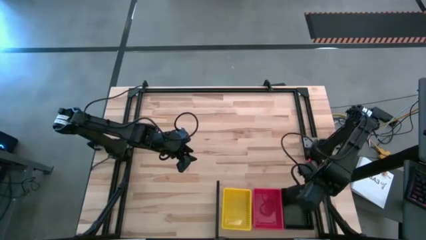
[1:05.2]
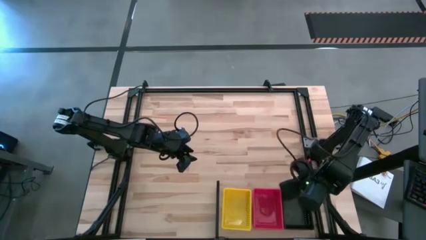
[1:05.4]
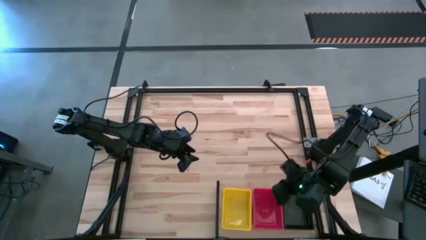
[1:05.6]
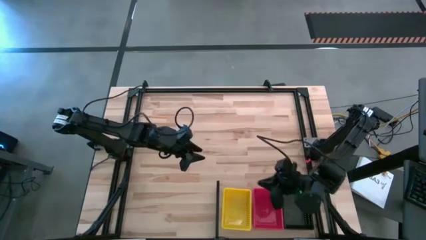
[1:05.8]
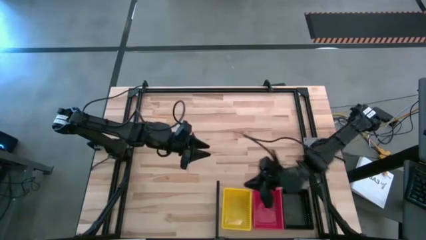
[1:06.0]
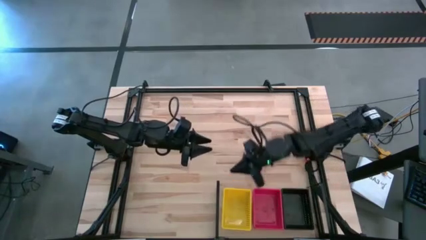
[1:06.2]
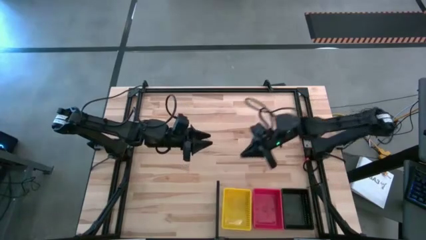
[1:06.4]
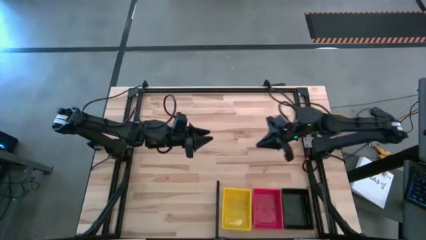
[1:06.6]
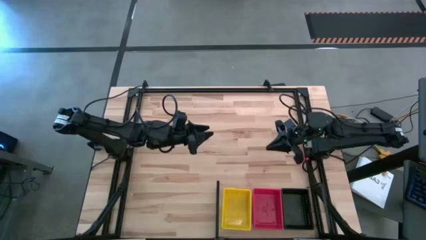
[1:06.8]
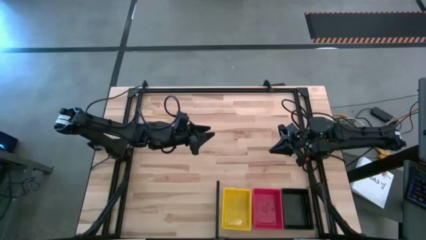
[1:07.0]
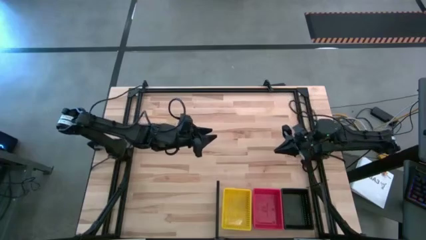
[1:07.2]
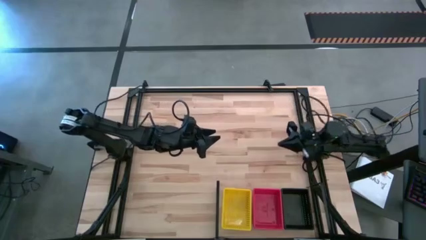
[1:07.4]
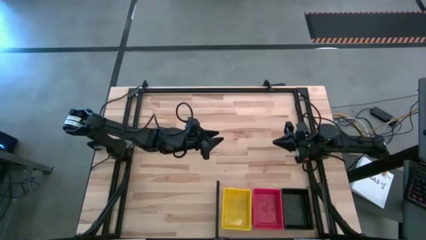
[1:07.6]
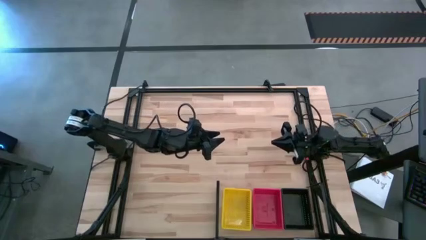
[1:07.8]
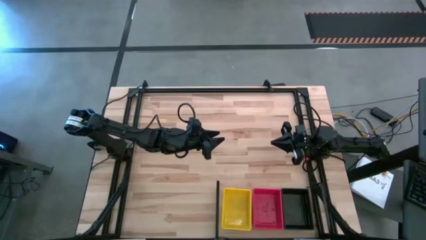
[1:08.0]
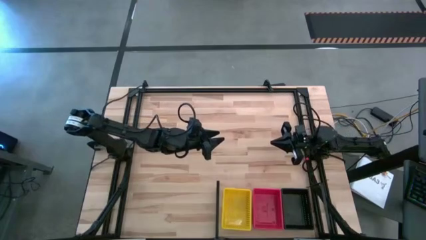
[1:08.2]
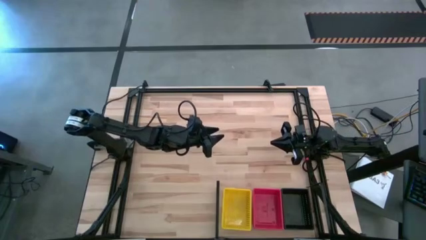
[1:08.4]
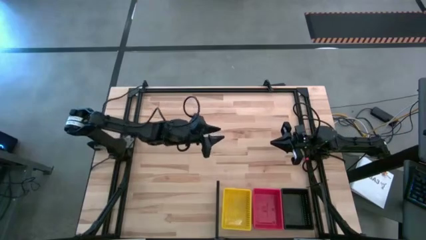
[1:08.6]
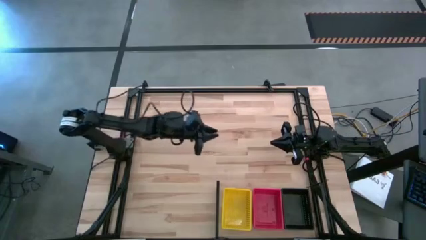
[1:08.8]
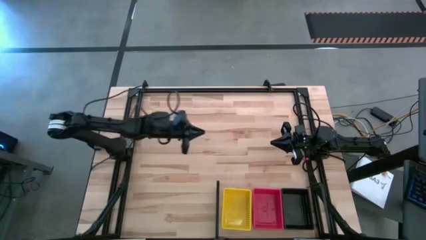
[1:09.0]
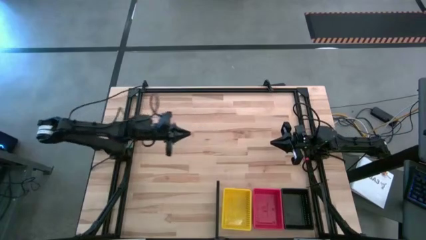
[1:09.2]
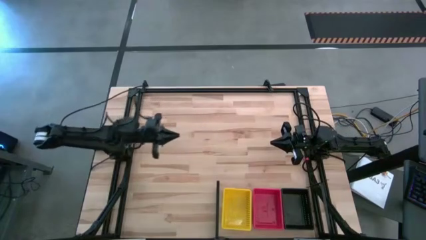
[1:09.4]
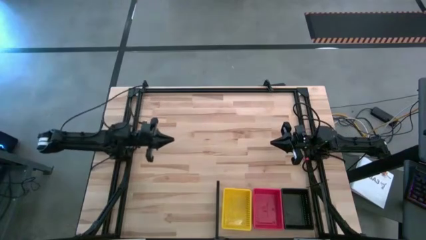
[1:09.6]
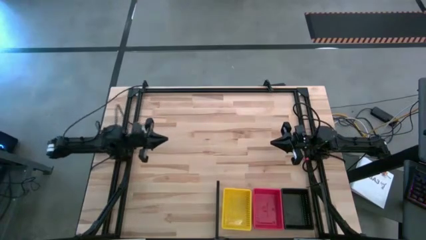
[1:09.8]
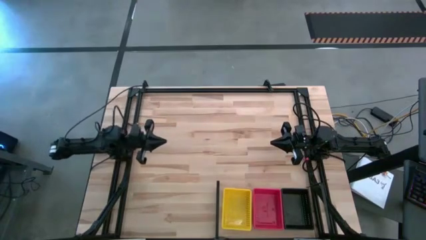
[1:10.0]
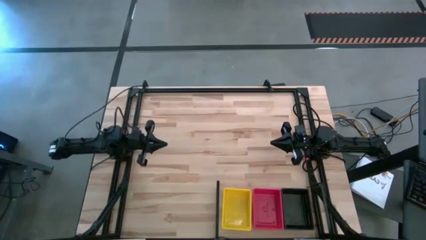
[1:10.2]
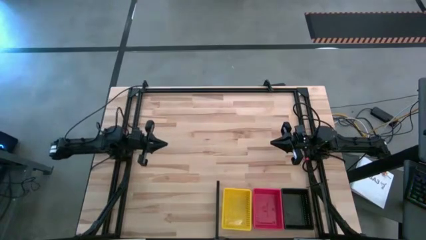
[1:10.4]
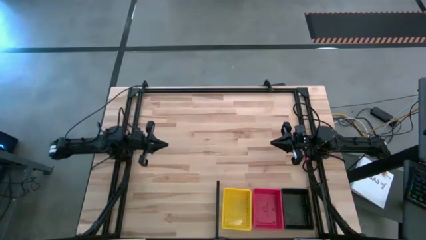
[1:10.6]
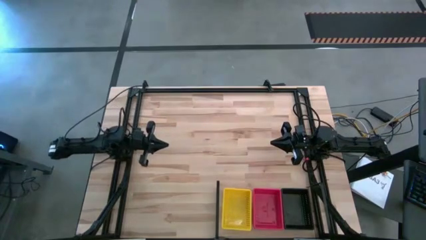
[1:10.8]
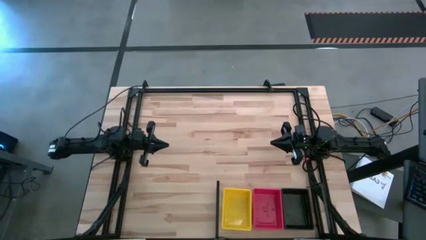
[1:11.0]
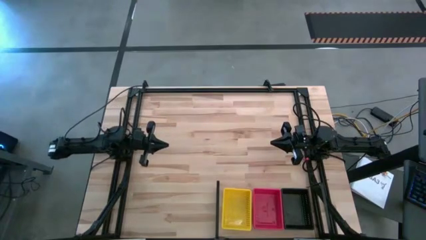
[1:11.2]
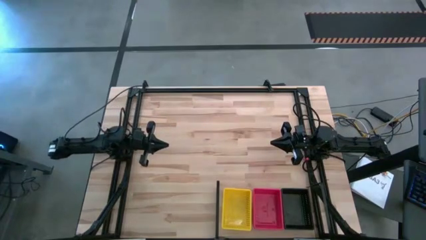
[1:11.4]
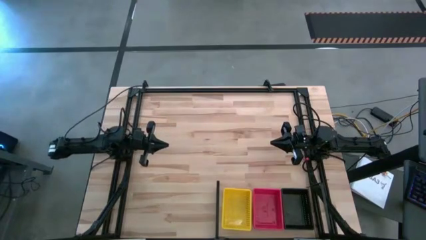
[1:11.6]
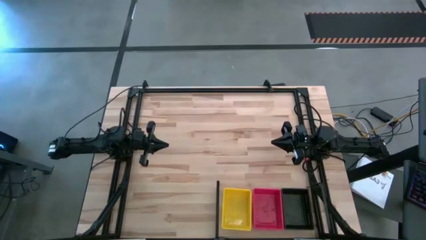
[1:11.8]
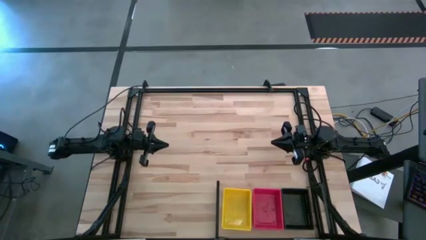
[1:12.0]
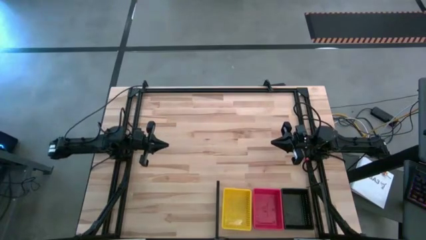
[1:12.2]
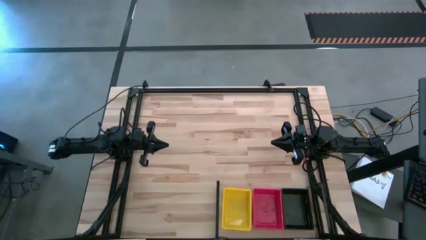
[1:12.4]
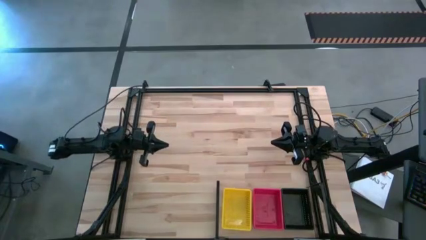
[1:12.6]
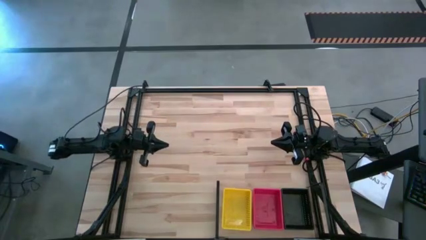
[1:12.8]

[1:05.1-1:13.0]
Task: Stack baskets on shelf by color
Return to Home Position

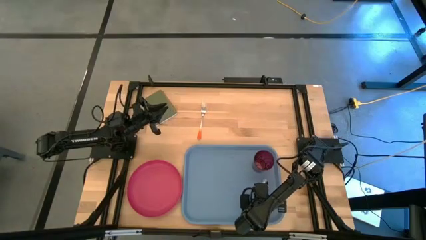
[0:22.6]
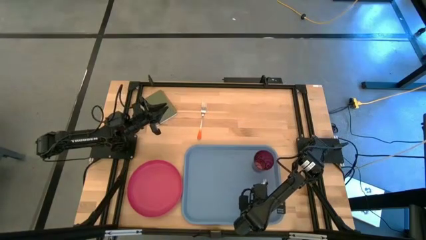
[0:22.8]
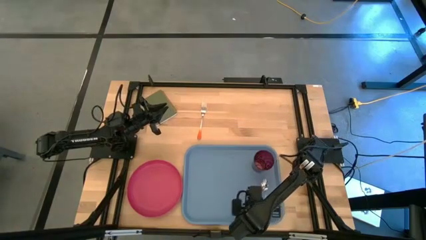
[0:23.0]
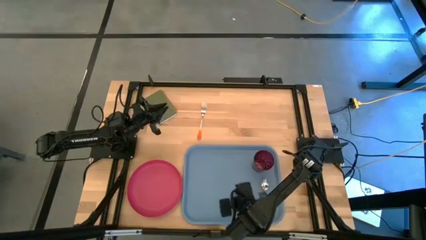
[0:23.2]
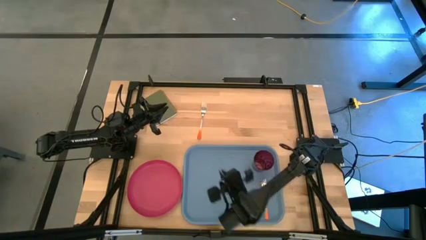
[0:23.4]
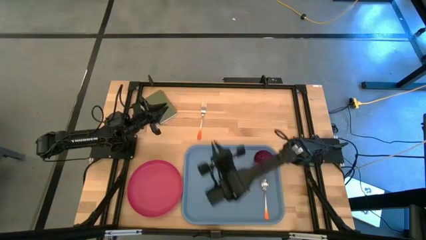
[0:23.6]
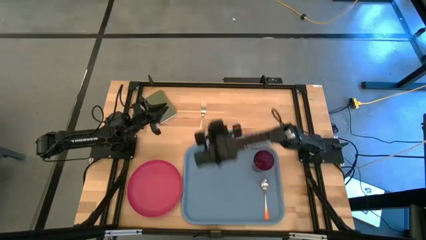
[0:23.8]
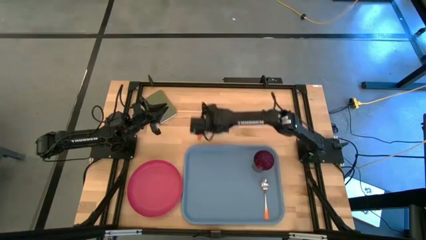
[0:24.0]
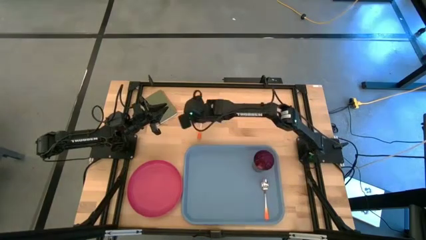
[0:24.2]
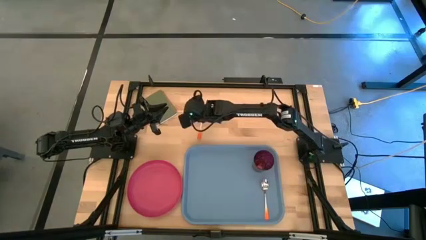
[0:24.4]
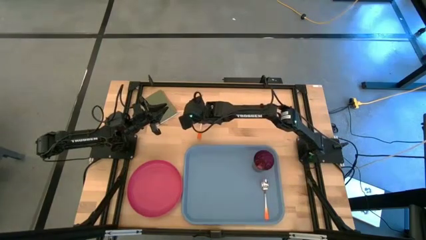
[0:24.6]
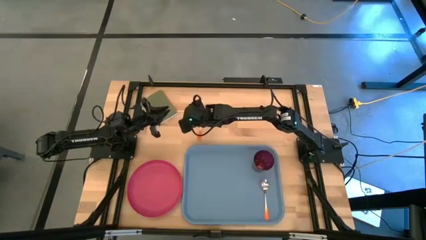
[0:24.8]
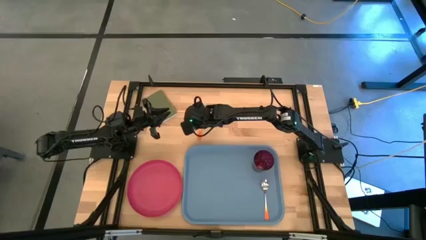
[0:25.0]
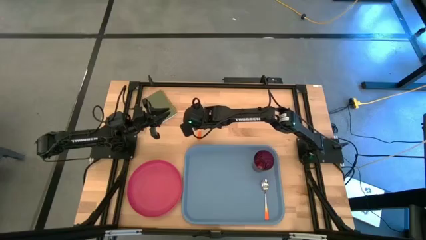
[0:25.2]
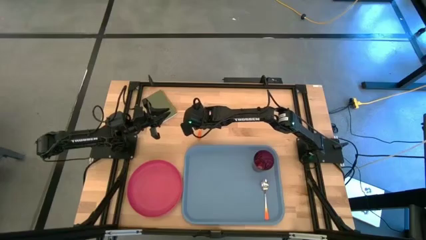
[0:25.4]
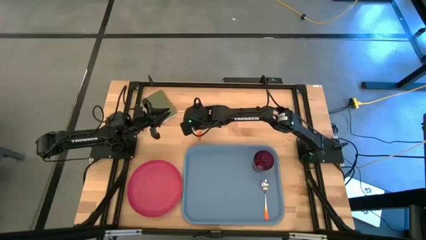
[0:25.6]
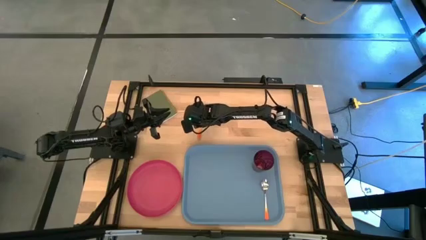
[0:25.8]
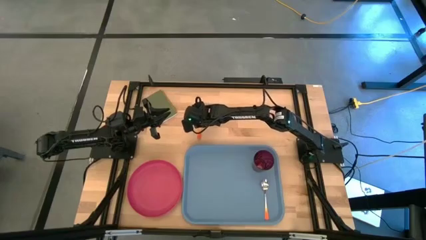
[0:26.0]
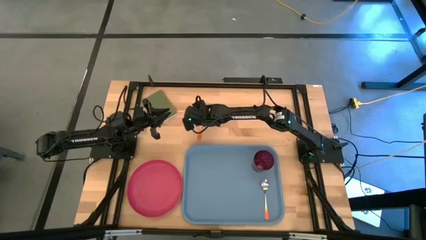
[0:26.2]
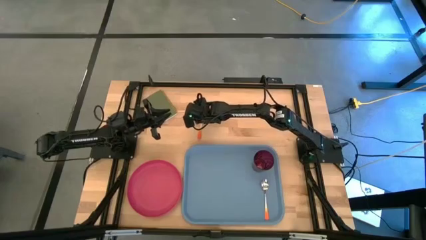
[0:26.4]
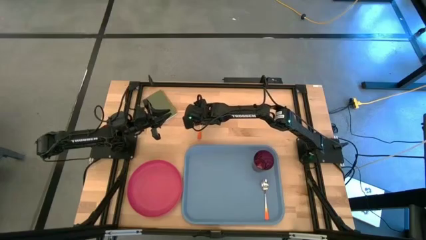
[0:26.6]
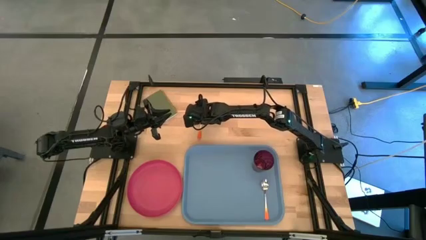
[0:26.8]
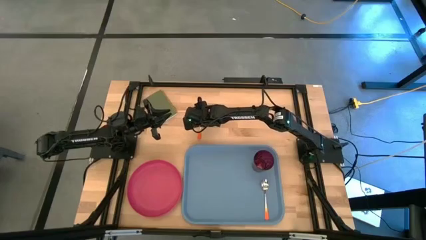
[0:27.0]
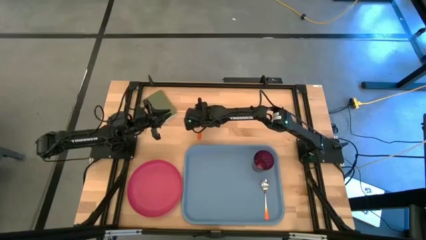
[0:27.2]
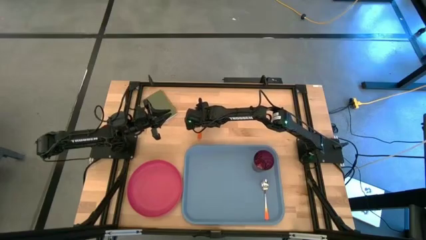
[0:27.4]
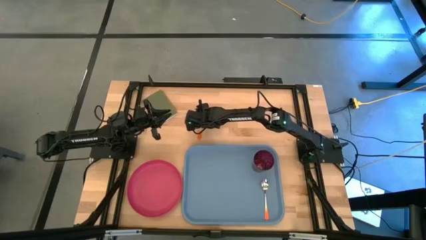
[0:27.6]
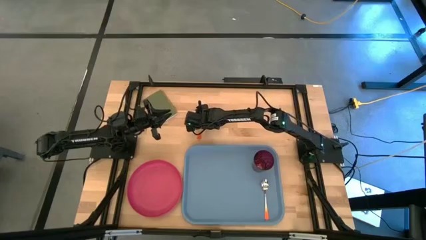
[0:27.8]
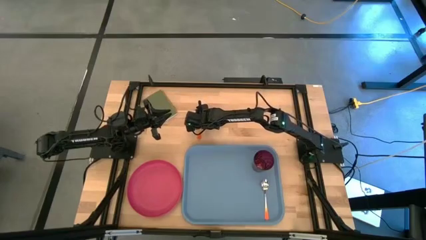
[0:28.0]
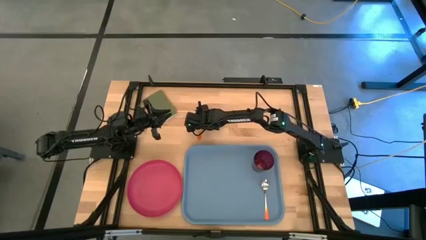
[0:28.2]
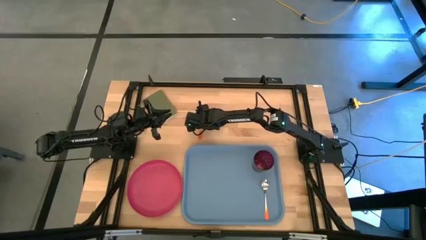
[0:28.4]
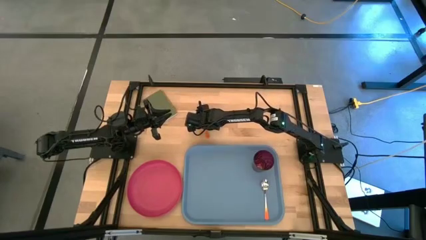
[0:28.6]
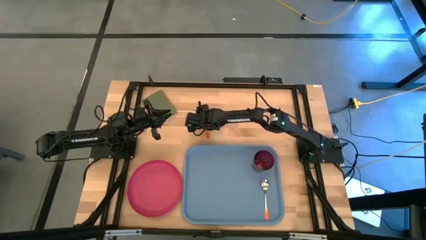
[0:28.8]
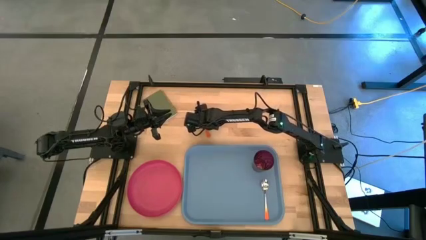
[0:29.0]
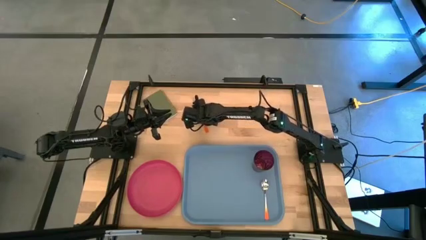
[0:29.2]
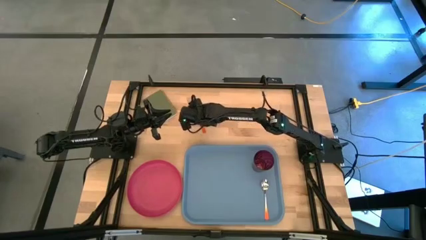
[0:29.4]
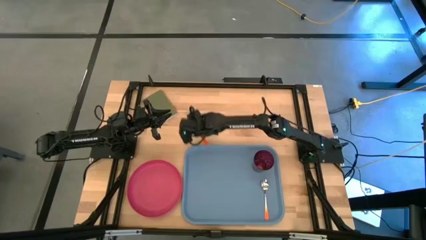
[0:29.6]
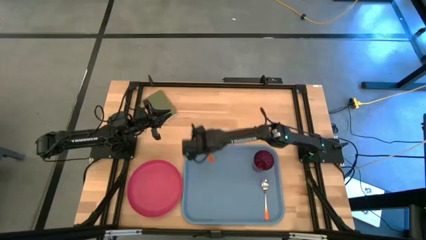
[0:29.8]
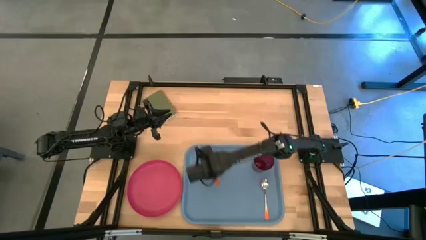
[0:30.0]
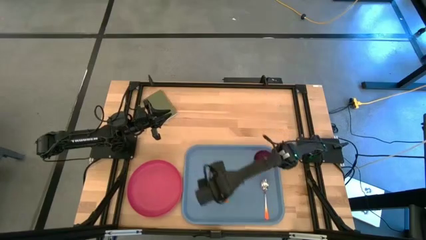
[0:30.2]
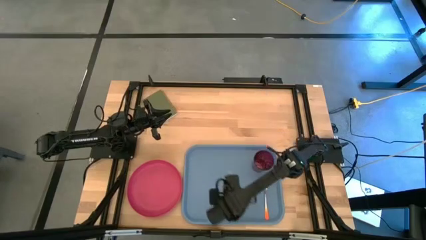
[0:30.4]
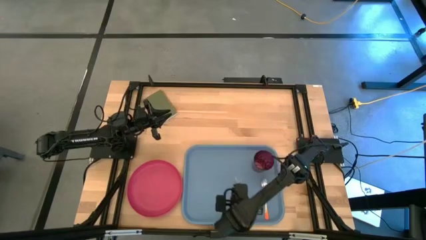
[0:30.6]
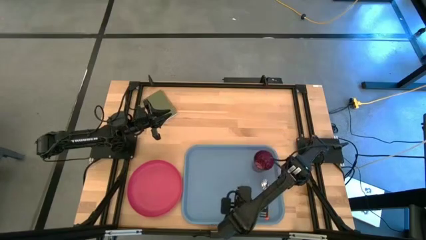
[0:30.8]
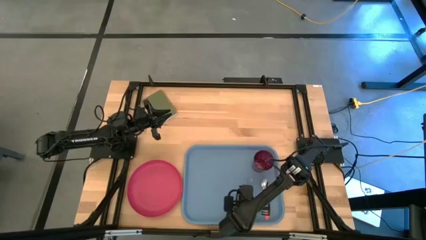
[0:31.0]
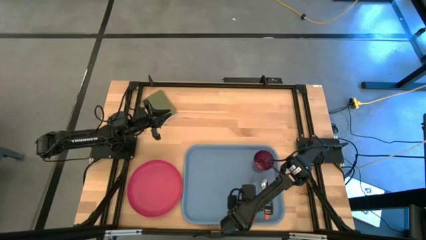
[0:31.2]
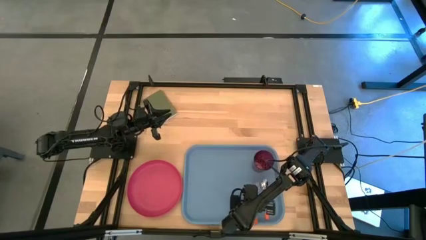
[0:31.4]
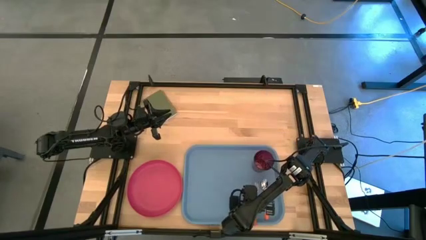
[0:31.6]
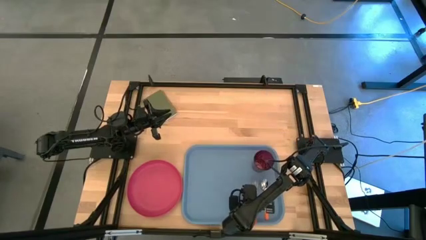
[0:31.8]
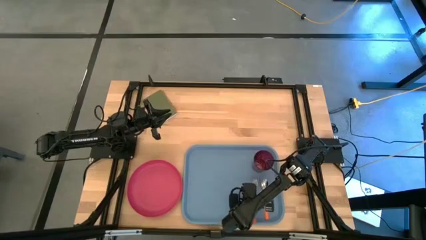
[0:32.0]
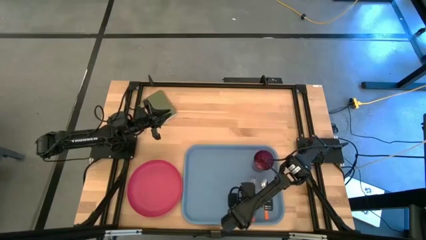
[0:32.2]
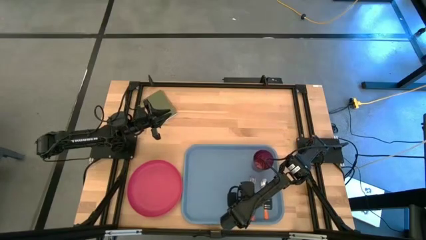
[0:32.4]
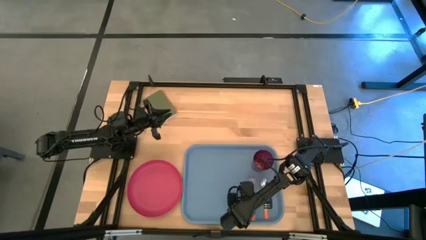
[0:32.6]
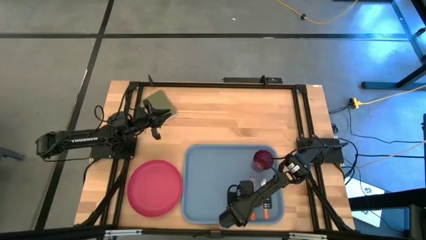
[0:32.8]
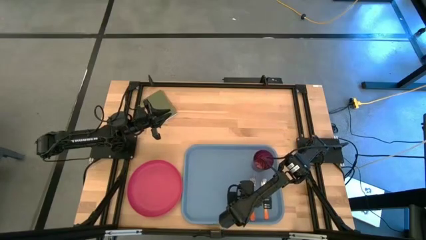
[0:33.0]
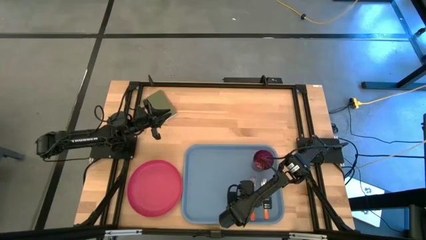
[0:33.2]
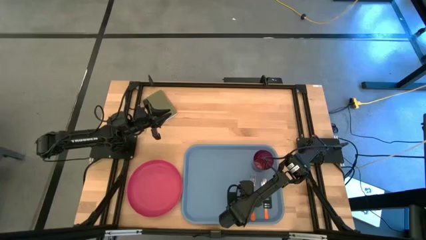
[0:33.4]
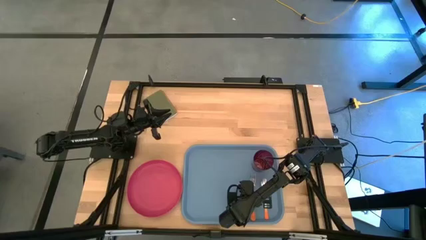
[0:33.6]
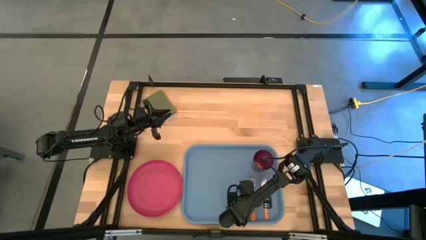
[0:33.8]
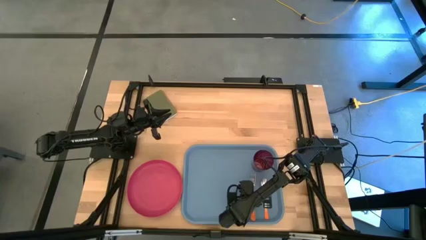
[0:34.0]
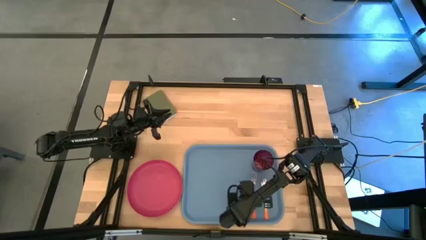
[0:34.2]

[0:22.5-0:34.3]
Task: Pick and place plate/cup/fork/spoon on tray
Put the orange fork on the blue serving tray to the left of the orange spoon
